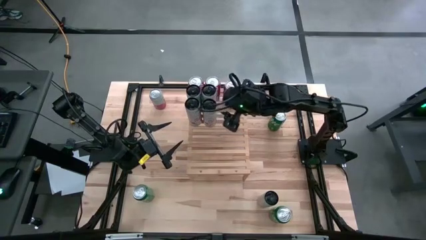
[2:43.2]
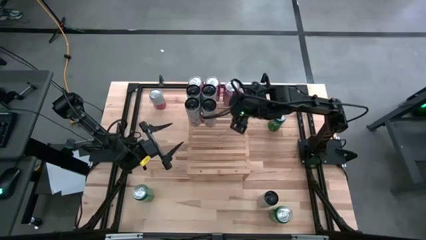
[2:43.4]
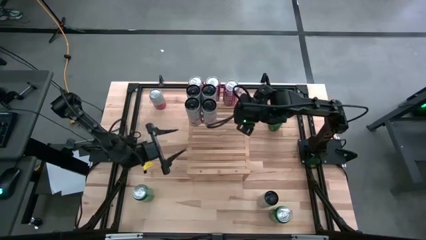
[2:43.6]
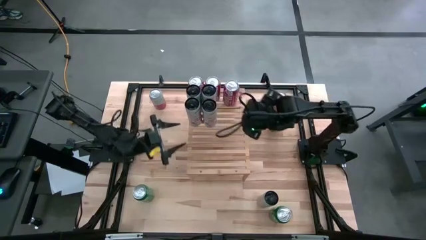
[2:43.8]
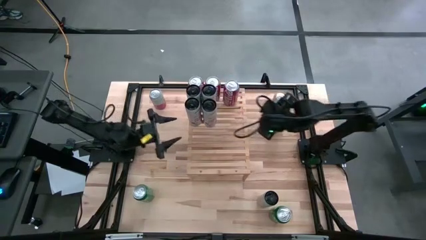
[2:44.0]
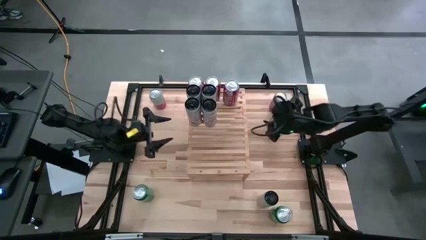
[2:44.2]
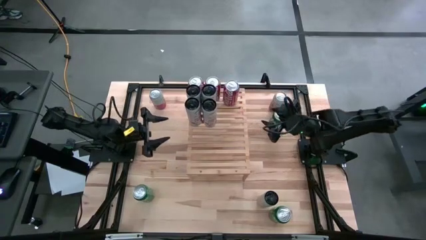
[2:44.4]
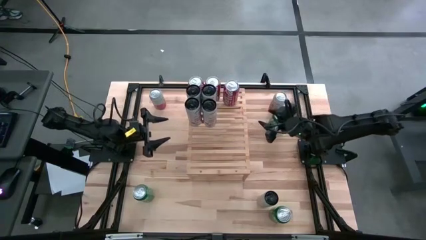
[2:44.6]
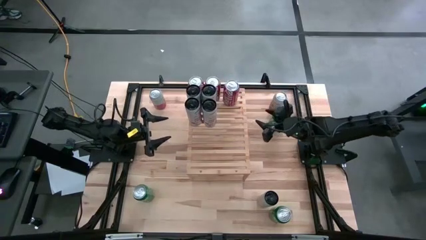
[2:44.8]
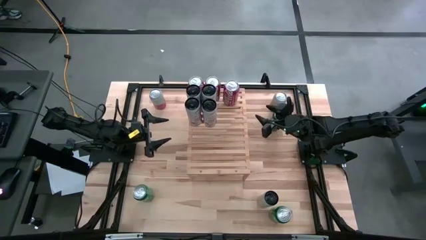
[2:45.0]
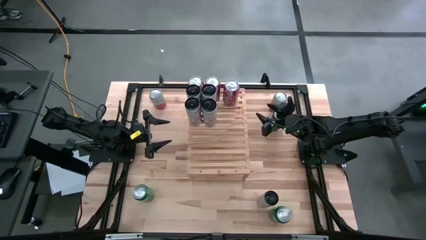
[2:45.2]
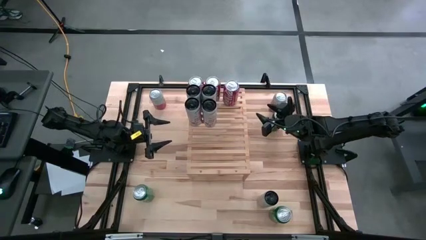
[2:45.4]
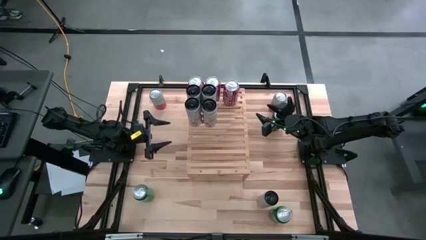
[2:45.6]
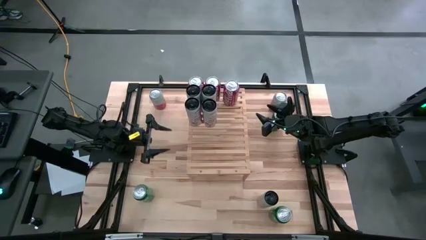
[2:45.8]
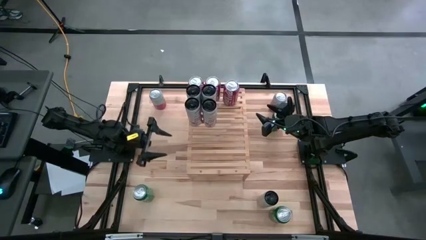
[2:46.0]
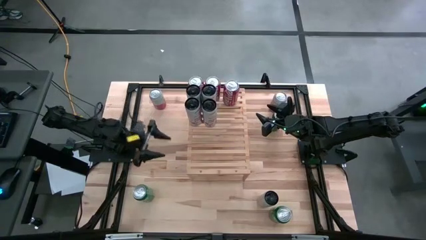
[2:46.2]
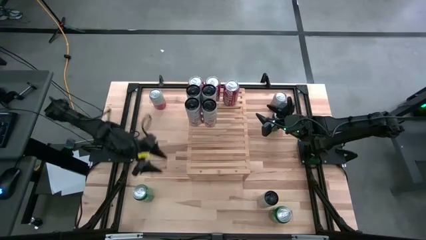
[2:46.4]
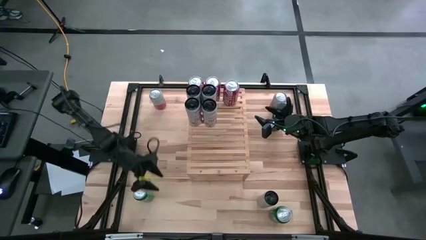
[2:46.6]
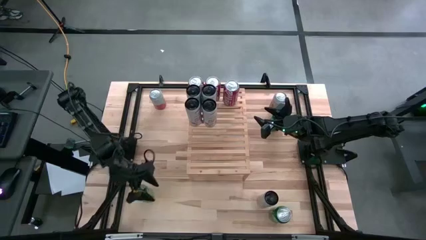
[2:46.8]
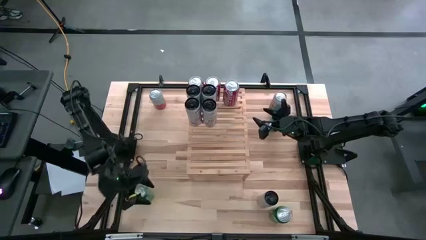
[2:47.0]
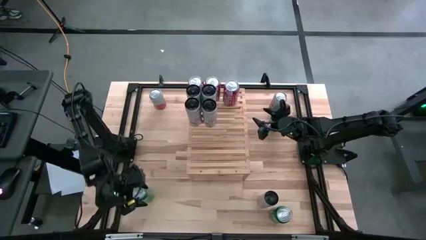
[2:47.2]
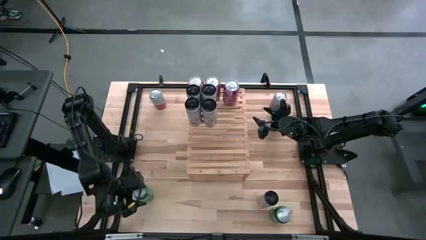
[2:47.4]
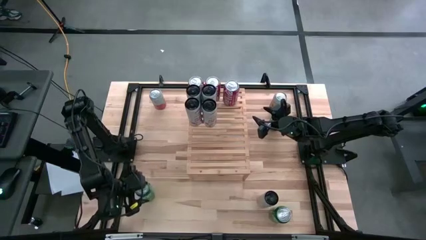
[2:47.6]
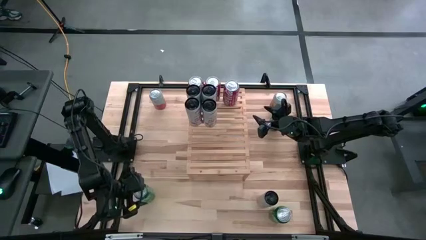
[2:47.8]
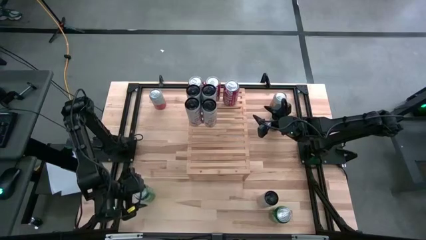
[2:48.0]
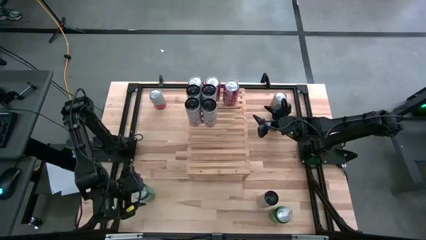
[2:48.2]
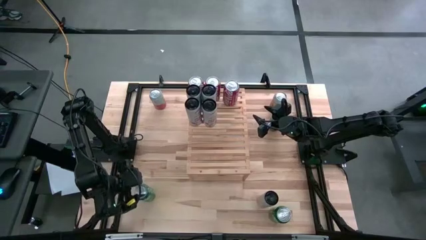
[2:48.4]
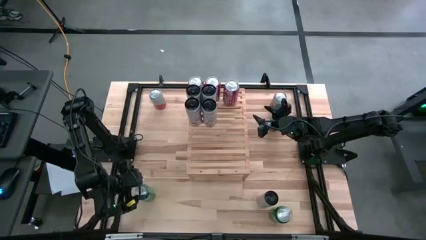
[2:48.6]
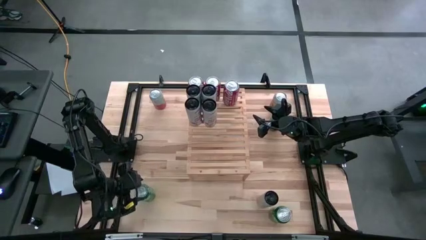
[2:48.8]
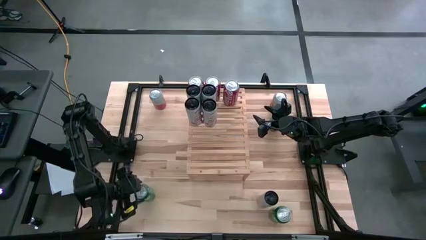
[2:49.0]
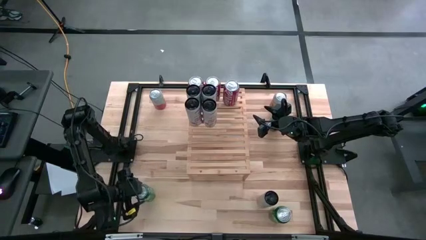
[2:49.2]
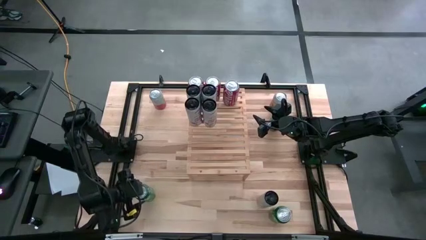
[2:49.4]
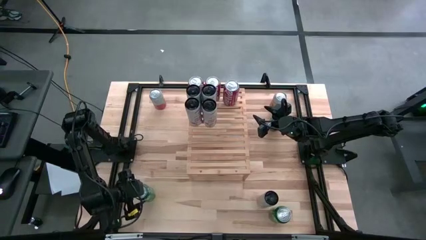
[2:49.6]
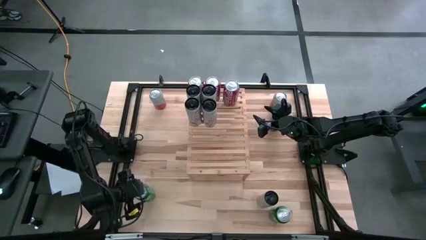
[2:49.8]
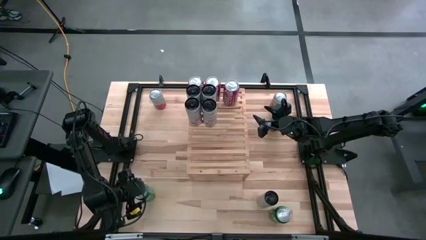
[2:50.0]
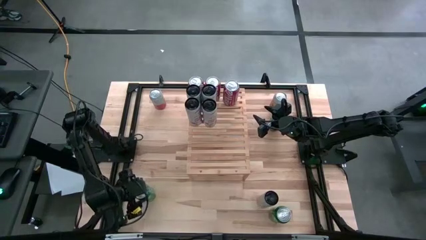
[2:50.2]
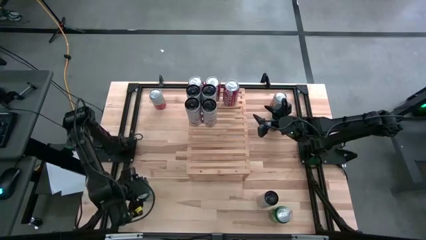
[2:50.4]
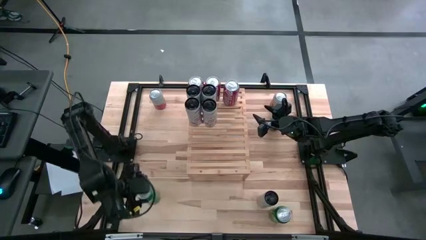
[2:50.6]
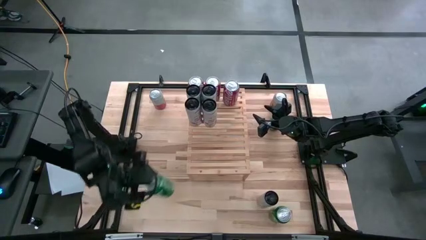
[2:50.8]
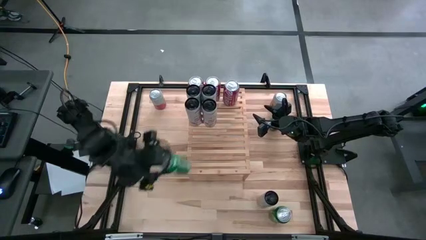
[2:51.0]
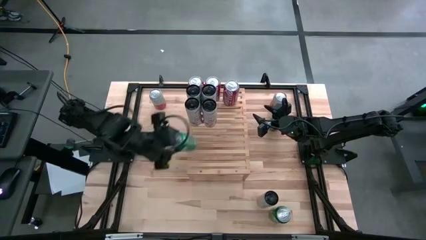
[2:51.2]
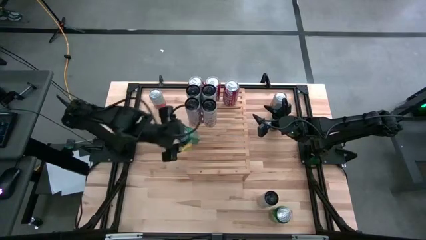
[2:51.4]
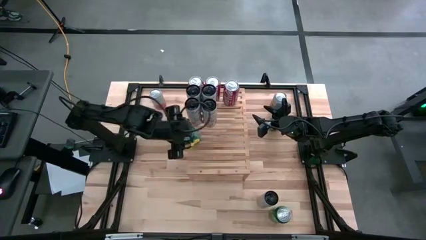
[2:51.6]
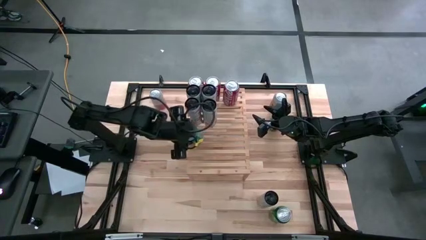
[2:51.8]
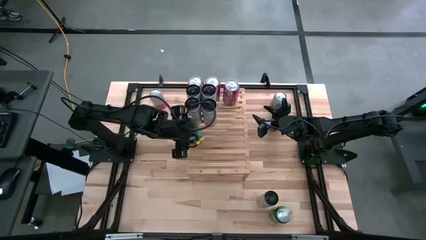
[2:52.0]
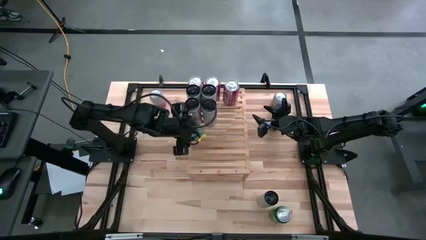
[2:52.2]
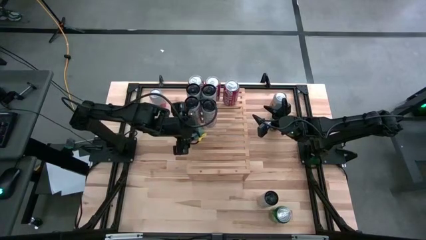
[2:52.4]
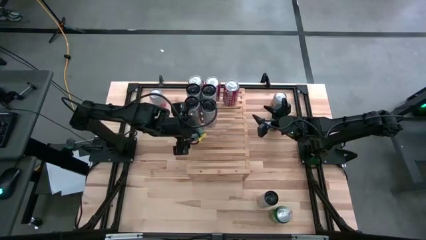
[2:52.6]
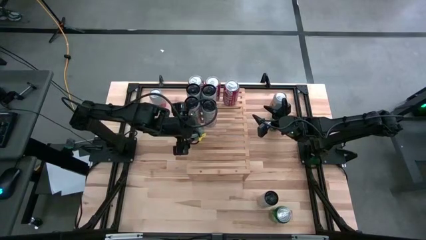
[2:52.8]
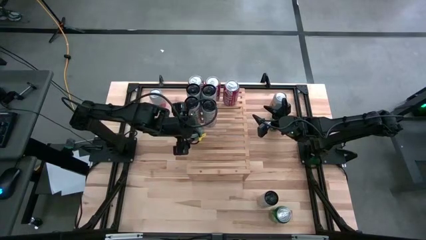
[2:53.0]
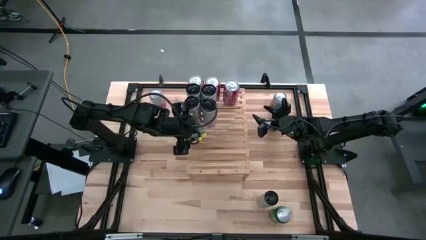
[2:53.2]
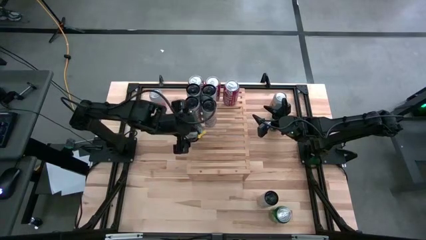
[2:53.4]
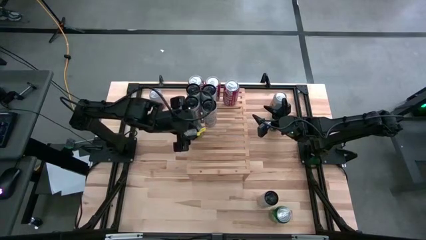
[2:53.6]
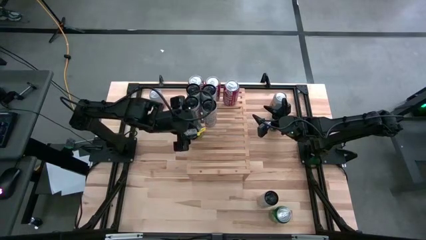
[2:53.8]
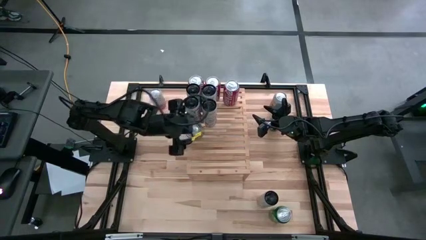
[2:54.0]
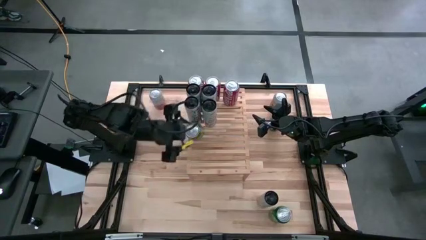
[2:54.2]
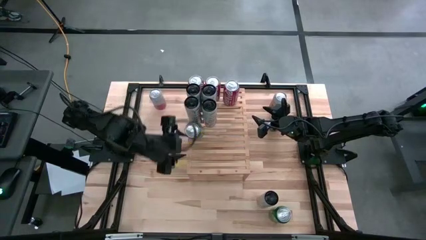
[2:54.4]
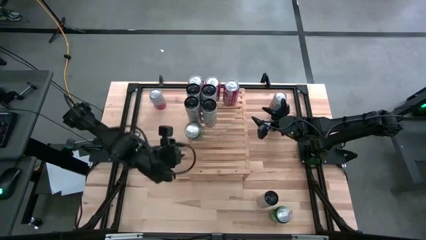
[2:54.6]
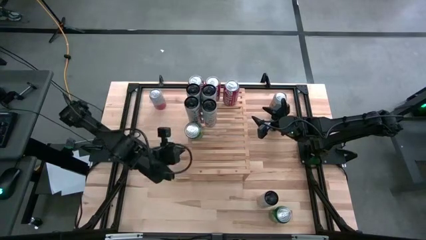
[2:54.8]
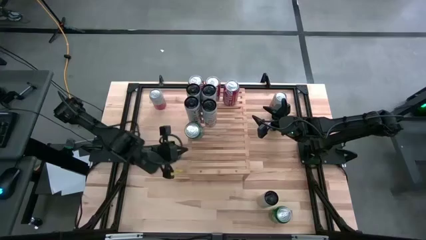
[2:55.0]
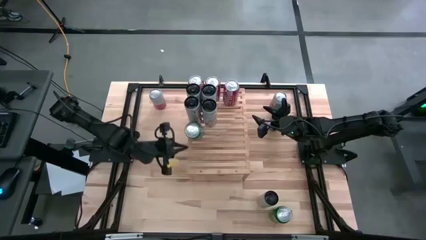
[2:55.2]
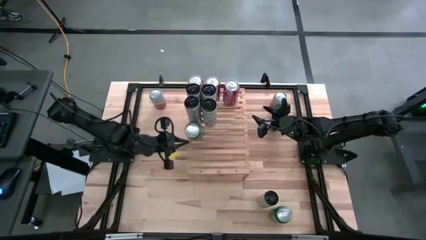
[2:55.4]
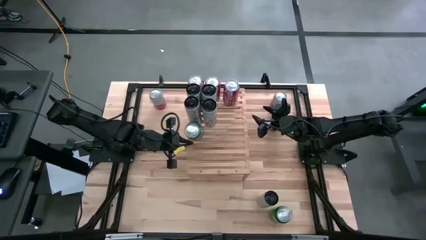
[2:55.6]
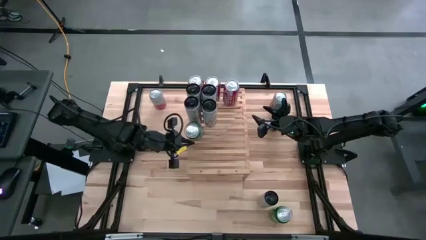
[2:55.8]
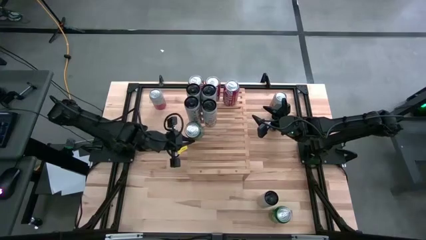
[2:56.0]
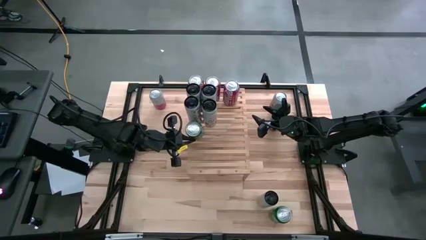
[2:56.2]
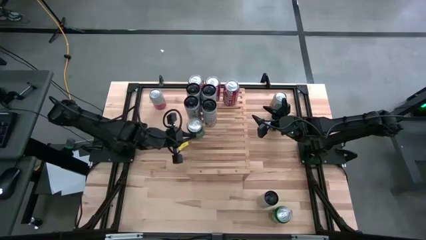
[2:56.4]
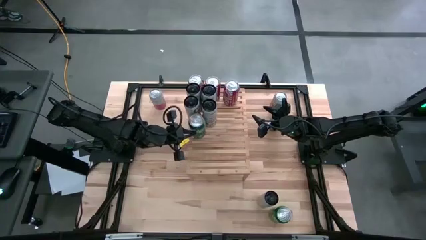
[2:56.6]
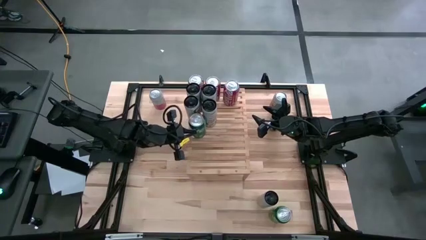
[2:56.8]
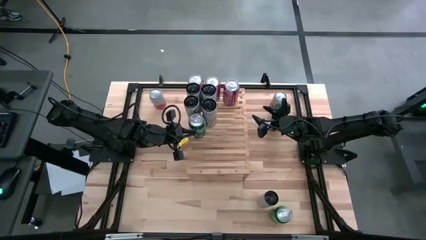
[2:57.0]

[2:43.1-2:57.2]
Task: Place canned beverage on shelf
Put the bottom left green sprite soda can on the shelf

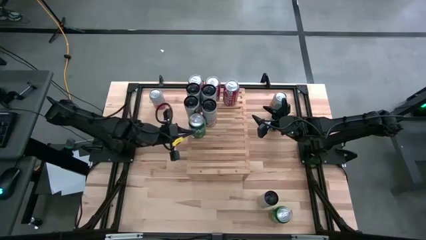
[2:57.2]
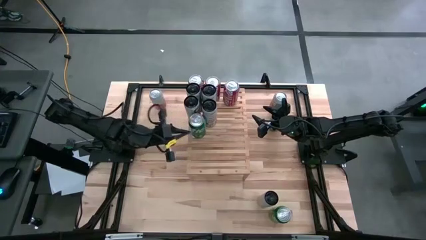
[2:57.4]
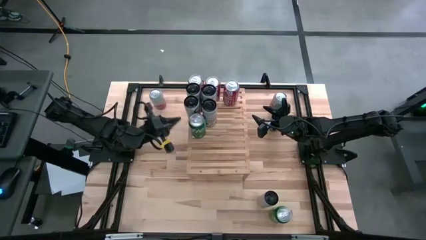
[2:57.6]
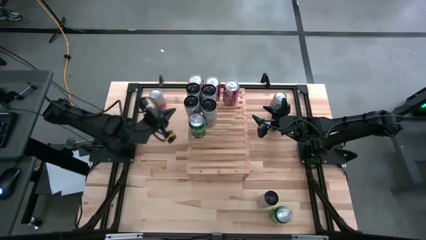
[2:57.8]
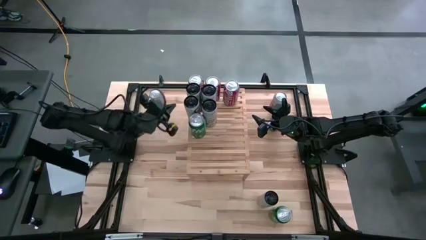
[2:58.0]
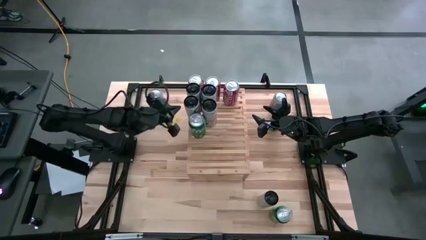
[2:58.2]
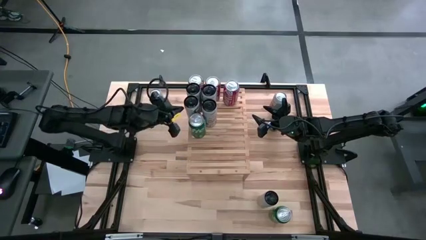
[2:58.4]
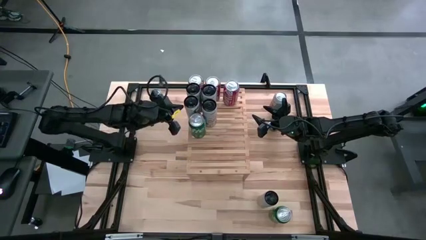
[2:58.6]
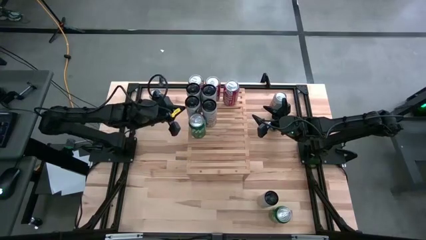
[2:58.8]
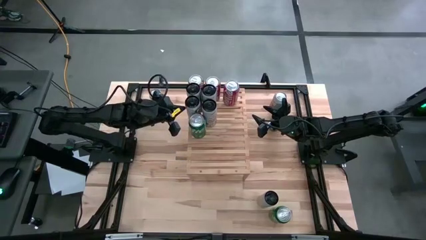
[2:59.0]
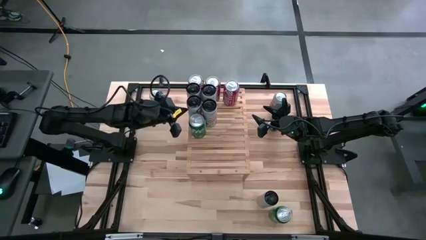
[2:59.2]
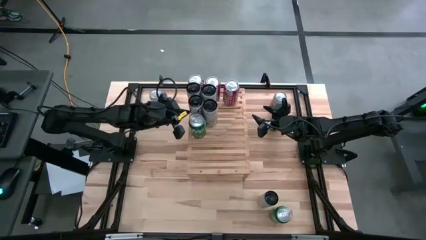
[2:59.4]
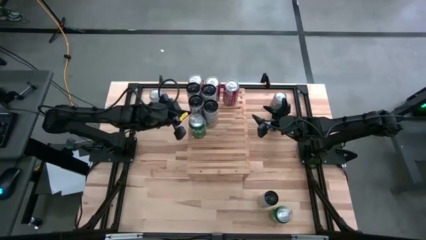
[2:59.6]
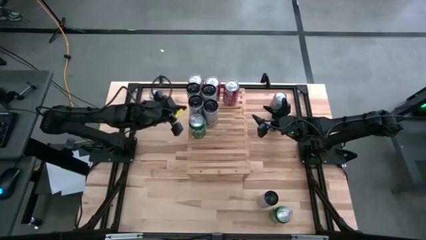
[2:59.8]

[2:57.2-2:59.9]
Adjust the peach vibe celsius soda can on the shelf
